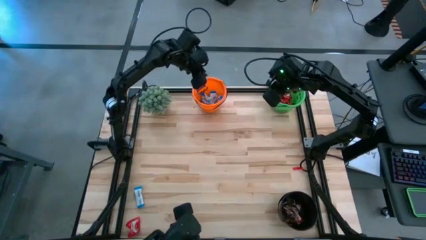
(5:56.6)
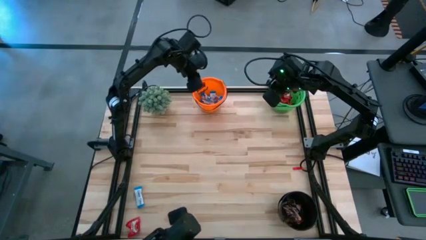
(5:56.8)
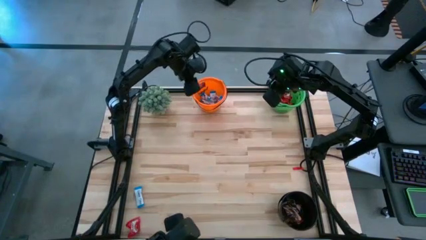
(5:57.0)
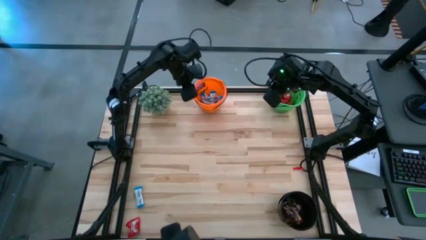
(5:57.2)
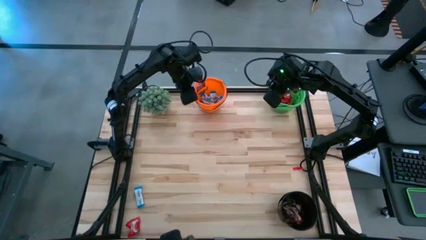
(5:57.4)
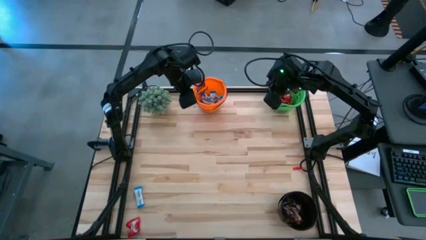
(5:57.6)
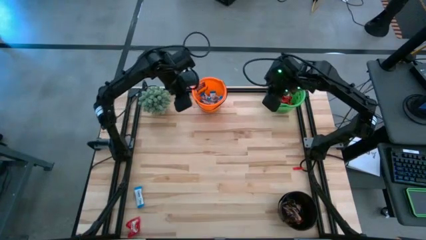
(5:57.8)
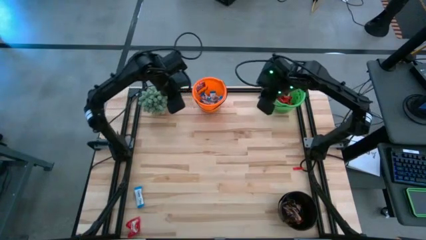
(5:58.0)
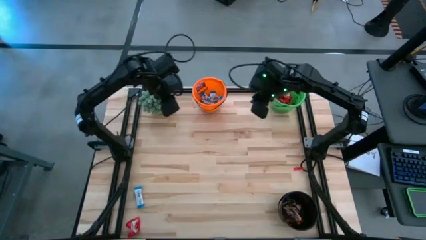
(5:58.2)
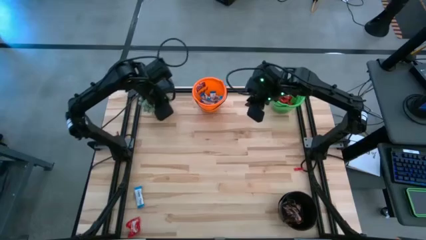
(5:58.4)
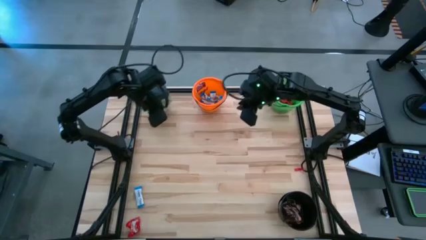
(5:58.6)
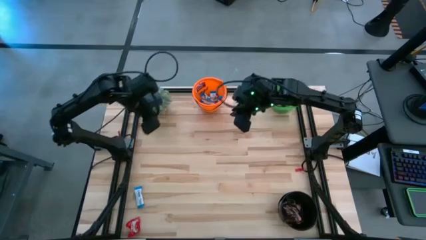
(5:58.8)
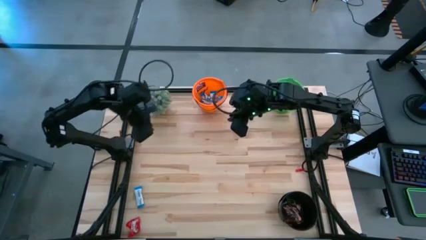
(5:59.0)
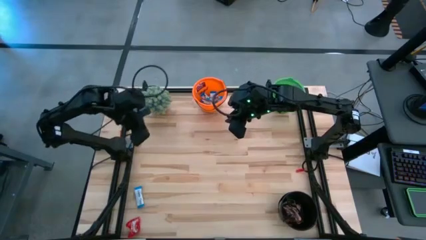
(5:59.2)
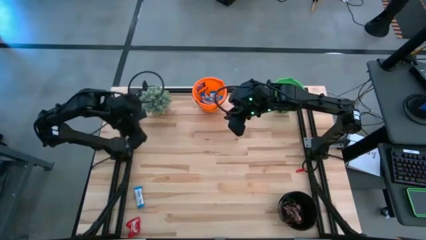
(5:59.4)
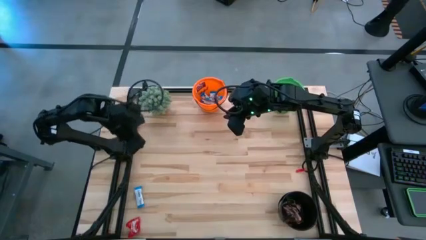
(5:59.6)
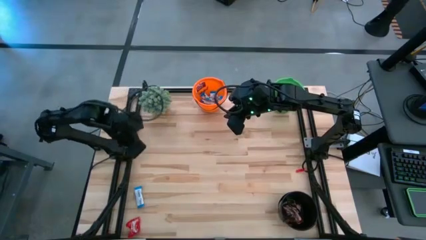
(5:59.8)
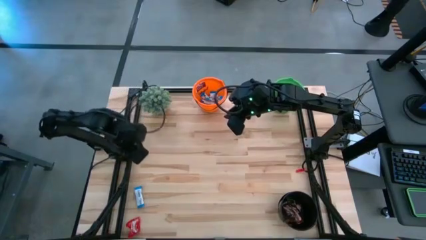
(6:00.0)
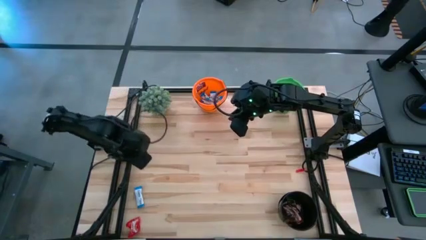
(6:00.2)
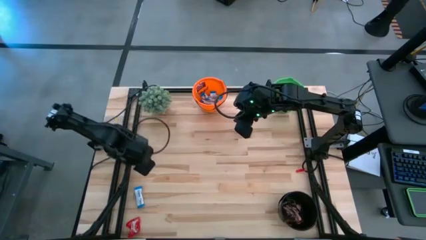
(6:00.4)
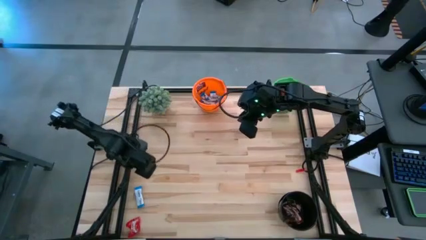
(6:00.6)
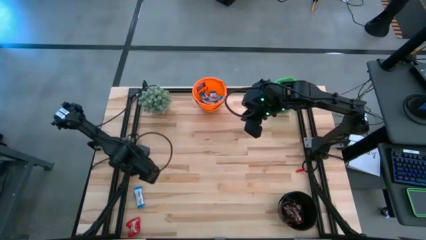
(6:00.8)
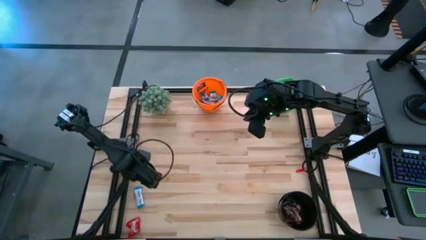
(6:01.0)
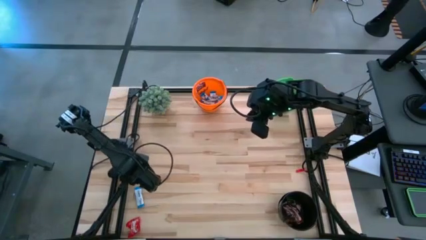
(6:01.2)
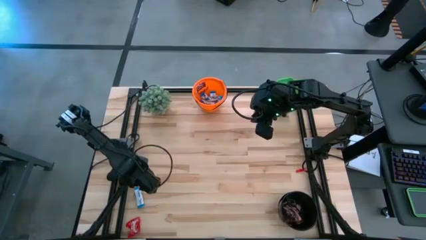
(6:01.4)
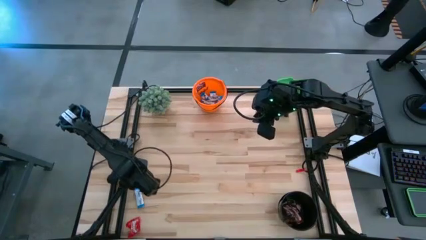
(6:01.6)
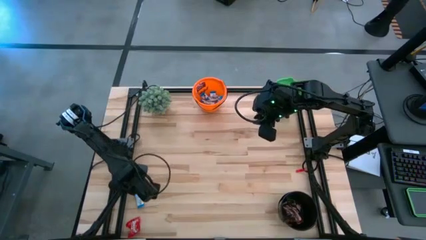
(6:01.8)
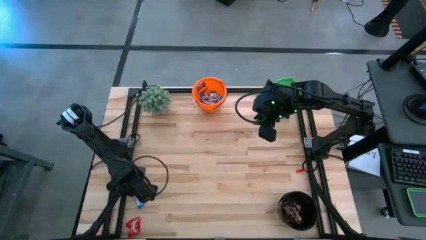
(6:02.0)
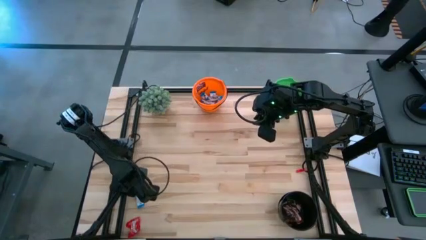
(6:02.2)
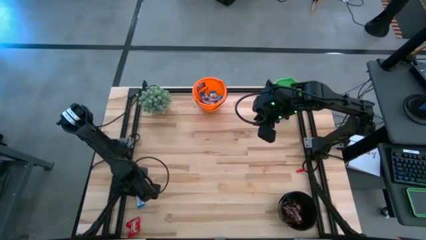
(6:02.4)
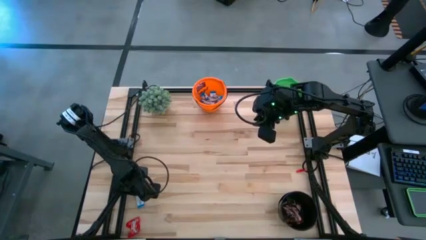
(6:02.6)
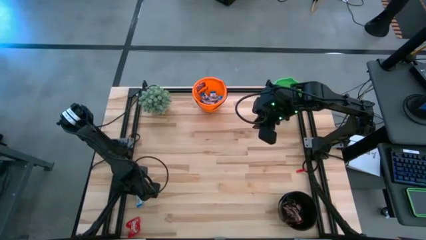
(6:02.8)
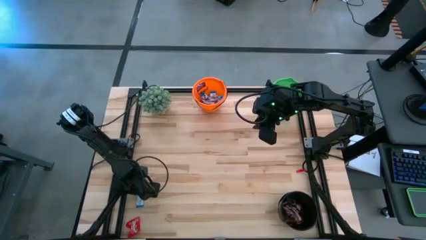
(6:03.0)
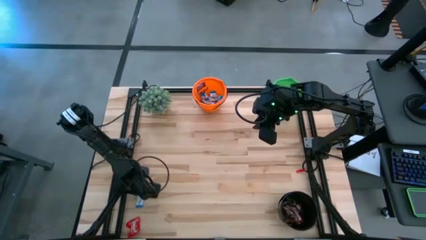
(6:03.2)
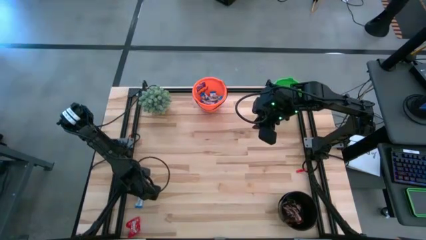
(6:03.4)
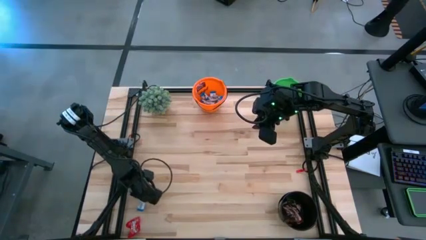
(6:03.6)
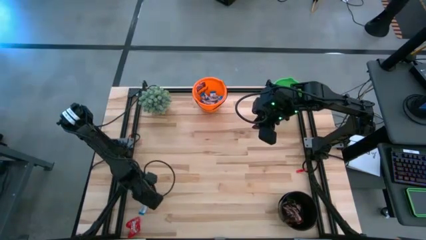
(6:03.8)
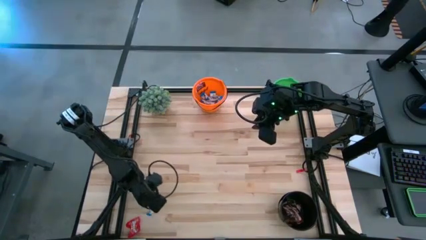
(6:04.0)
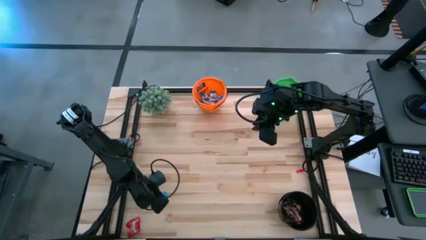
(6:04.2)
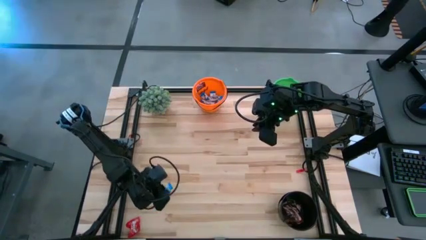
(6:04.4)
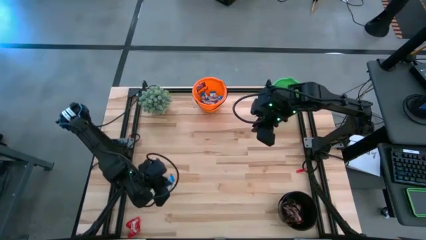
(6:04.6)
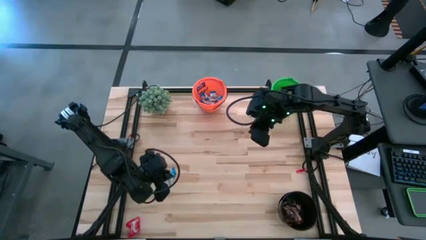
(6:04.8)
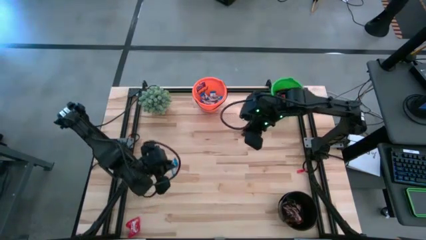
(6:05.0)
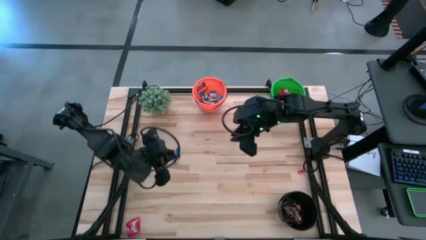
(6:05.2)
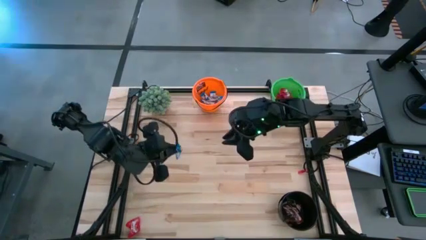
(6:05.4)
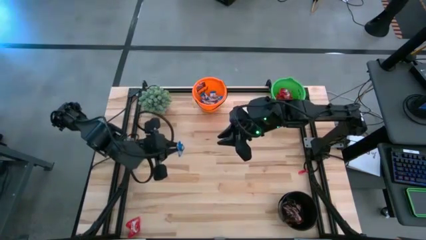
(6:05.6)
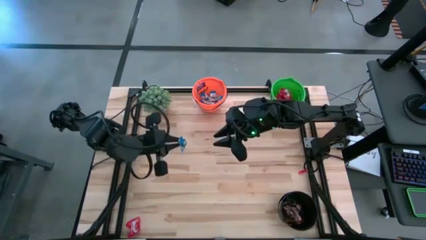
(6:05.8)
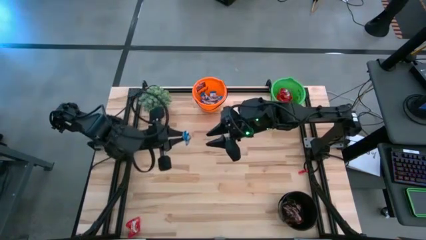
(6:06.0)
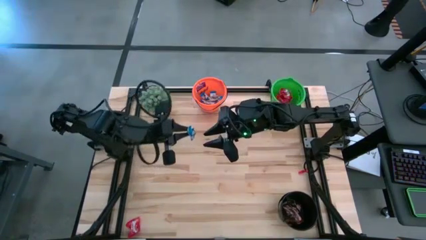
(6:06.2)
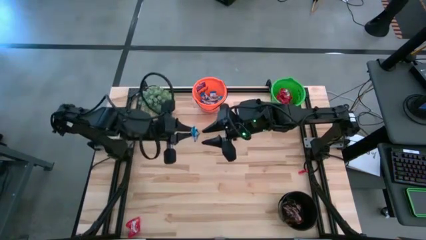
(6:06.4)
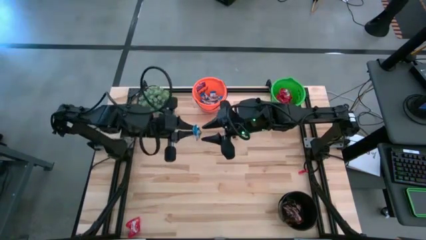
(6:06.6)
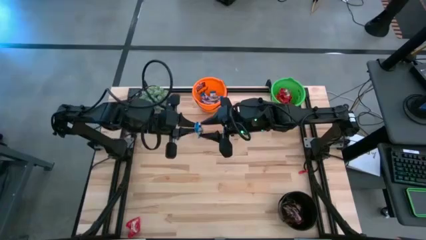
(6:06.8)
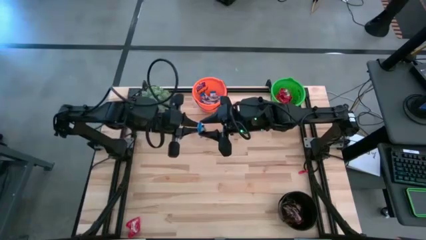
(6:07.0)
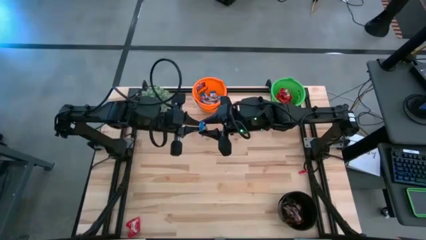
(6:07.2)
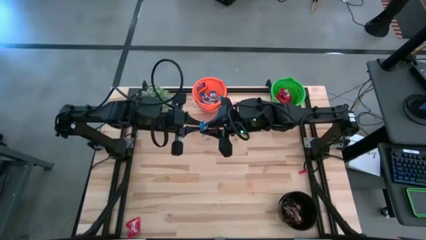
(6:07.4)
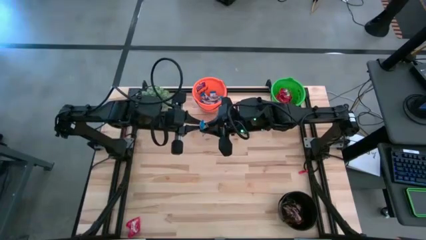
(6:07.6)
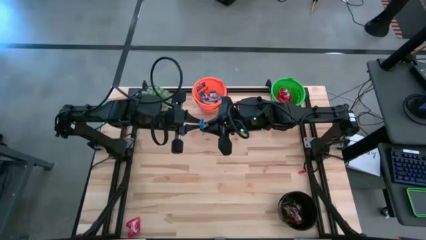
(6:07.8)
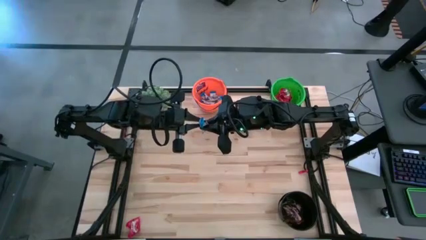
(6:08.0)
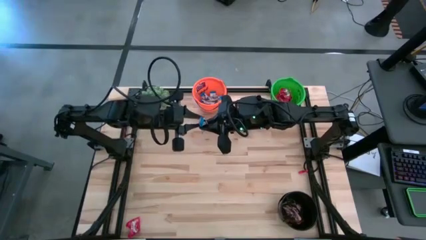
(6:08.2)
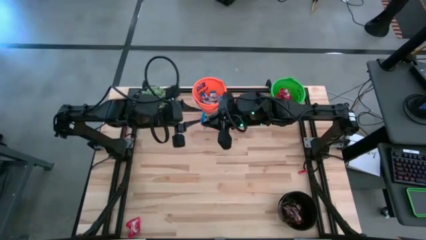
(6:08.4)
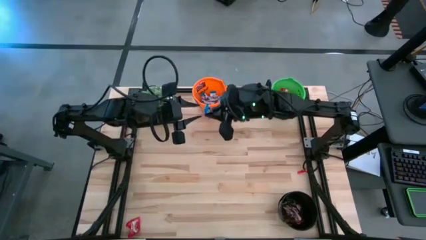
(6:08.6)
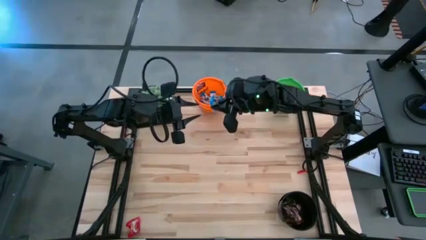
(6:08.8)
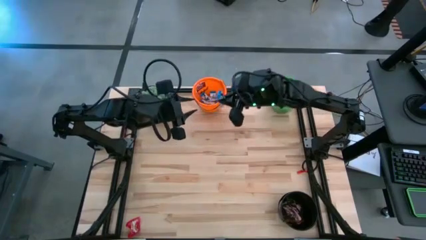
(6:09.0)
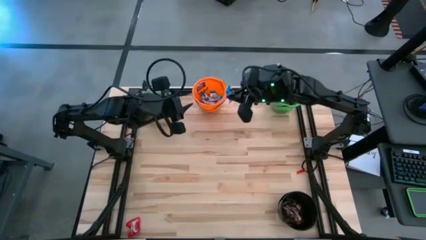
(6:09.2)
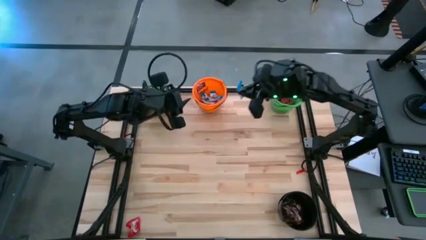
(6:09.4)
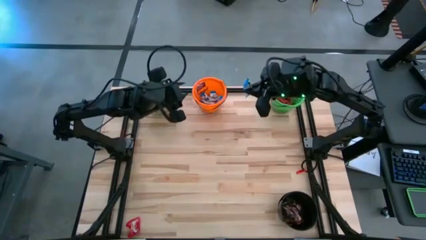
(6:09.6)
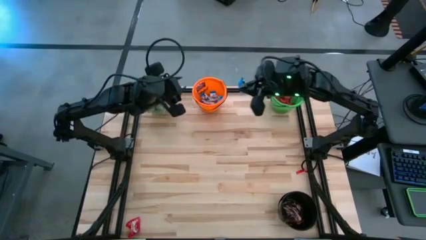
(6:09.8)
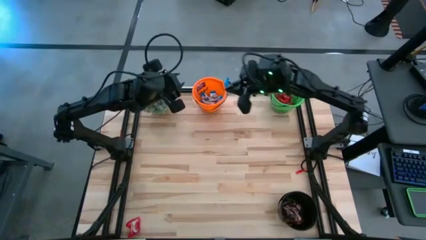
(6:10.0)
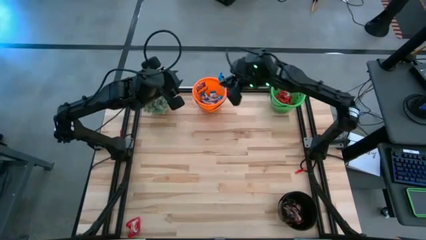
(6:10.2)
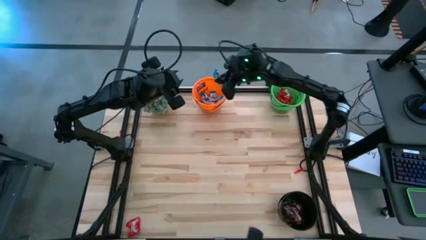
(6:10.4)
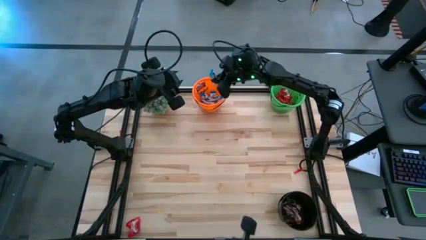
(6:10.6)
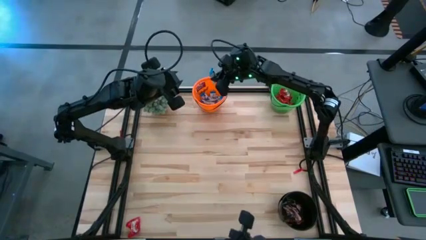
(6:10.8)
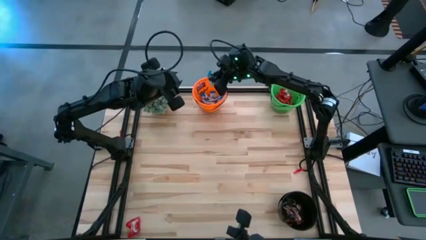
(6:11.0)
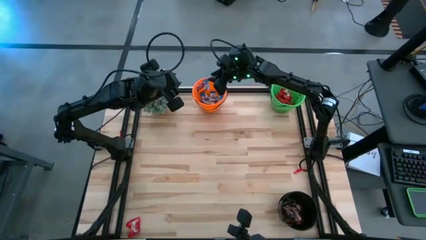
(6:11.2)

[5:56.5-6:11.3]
Task: Organize candy in baskets
Put the white chocolate bar into the orange bucket
